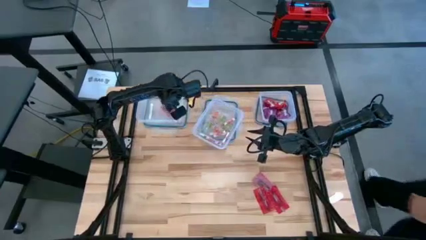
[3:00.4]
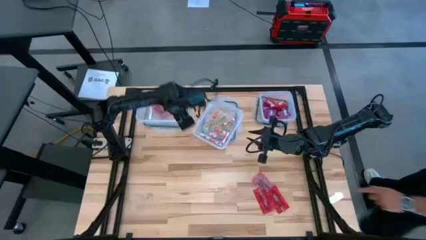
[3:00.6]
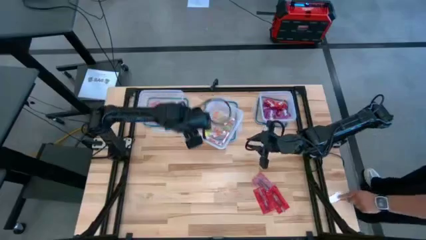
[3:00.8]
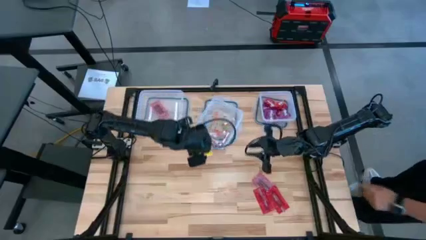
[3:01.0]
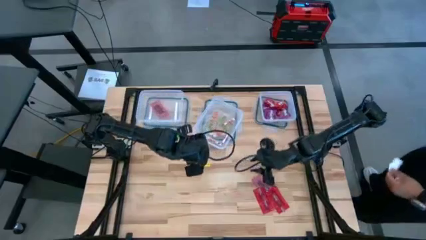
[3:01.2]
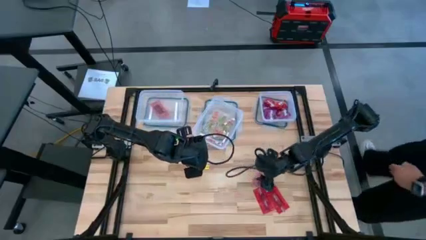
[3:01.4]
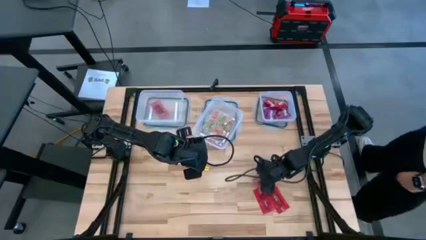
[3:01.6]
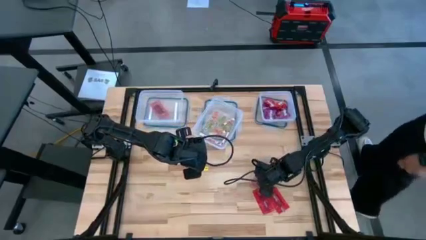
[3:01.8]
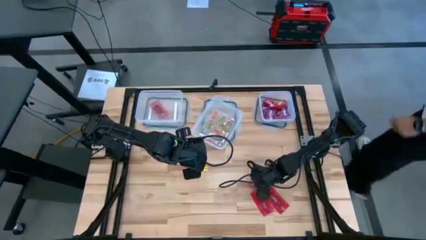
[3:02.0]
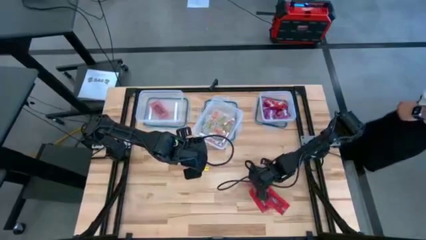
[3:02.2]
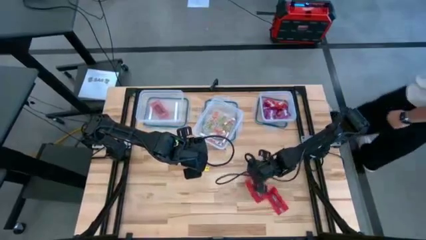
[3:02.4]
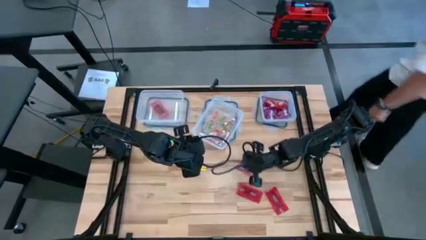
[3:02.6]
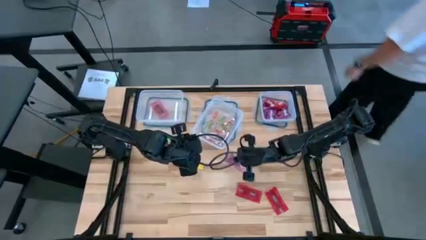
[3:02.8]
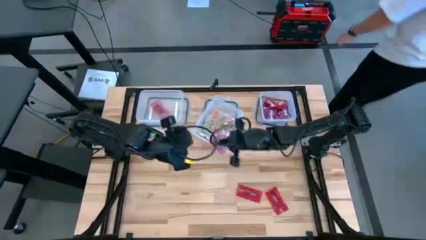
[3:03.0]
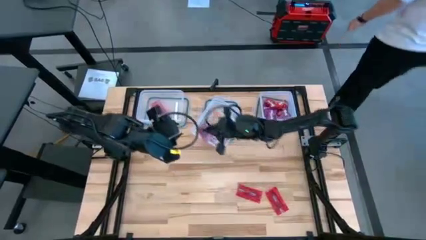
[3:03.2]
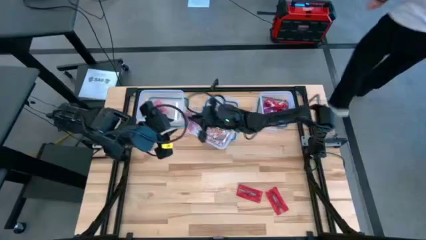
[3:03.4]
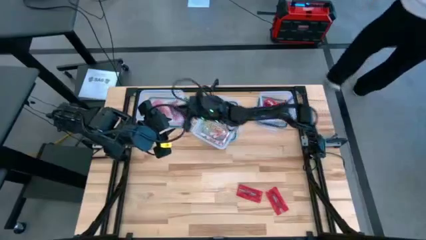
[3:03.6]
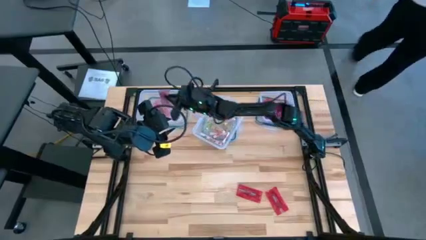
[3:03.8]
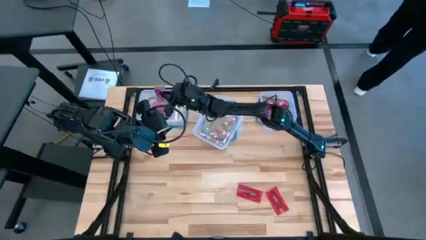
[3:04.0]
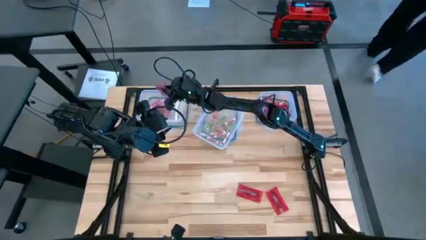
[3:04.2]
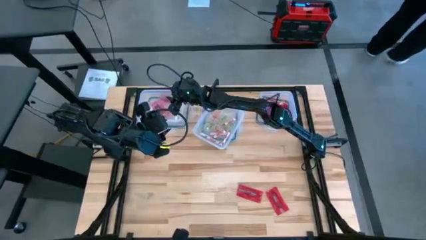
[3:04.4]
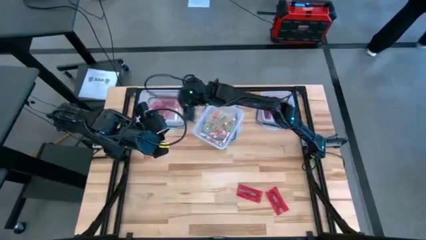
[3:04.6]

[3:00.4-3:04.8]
Task: Sort candy
Put the top center red candy into the left transparent bin

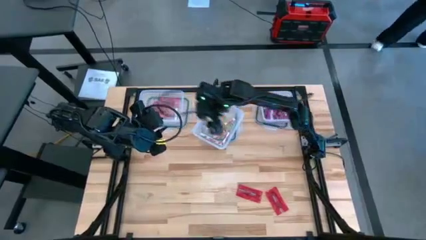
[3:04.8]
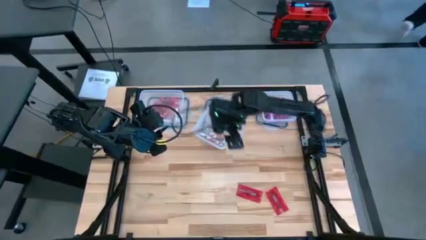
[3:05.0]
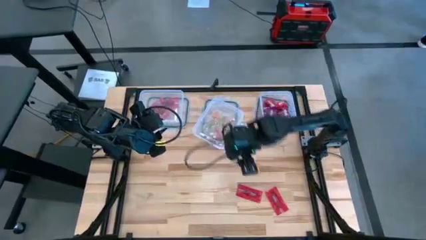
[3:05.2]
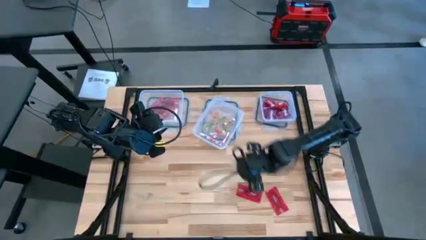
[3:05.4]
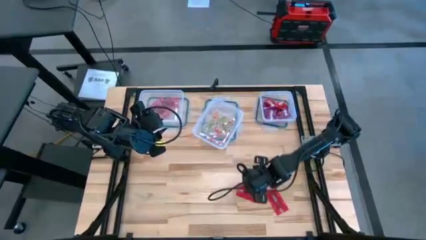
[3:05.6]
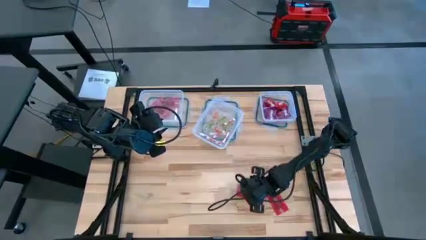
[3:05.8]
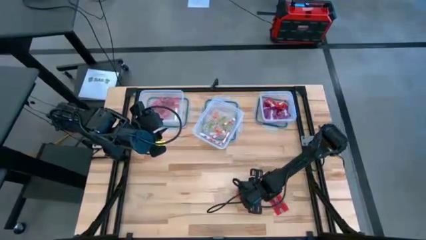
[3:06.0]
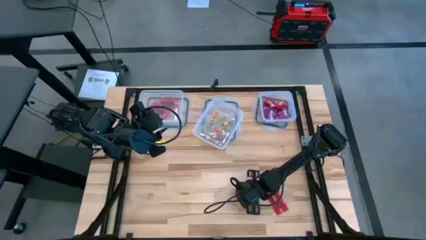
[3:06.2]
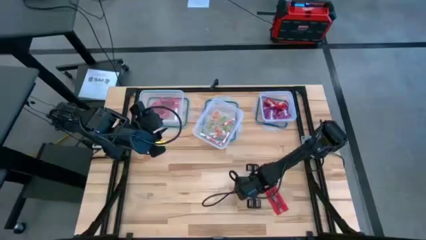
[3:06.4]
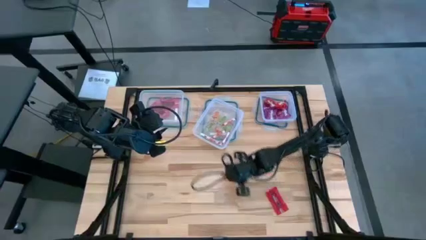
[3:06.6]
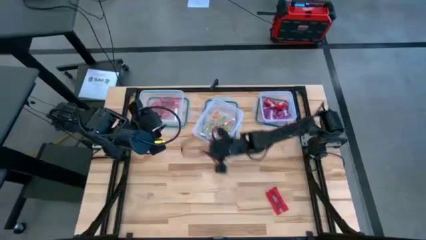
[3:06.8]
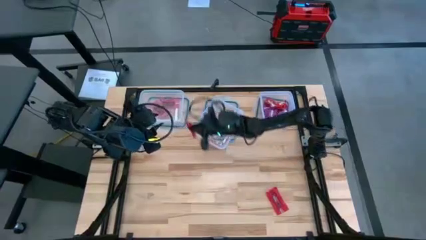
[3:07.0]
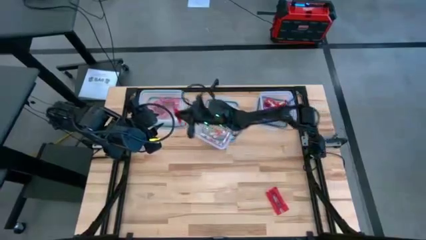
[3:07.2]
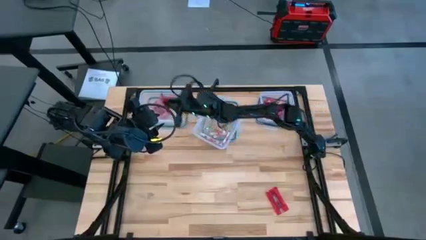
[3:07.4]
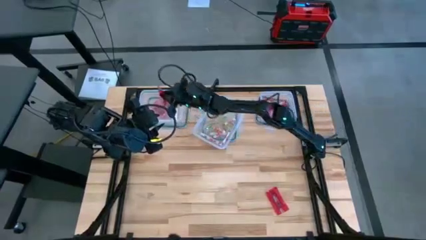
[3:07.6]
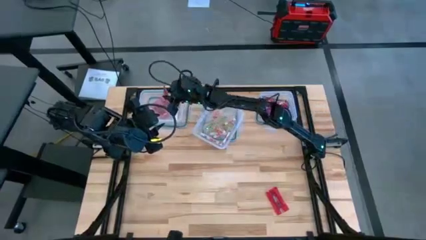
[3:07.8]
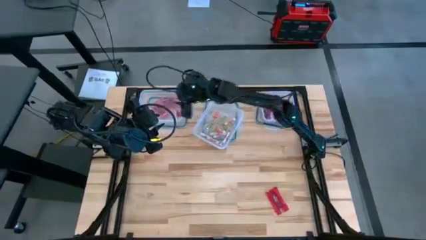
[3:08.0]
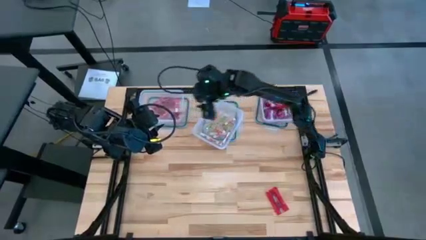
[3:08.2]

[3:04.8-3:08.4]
Put the left red candy into the transparent bin

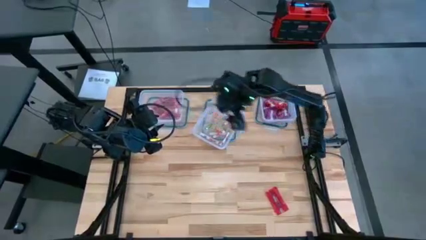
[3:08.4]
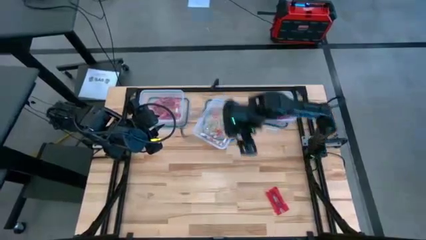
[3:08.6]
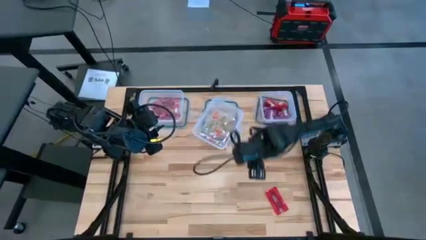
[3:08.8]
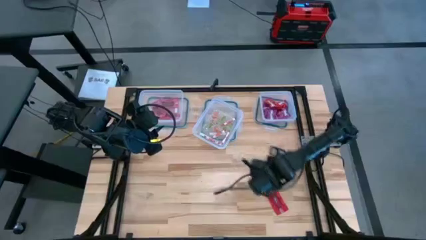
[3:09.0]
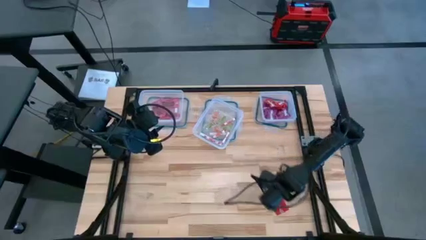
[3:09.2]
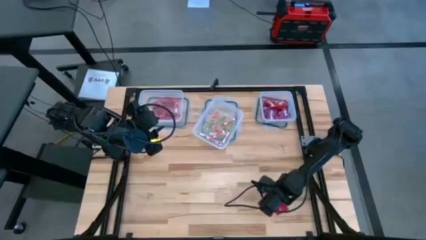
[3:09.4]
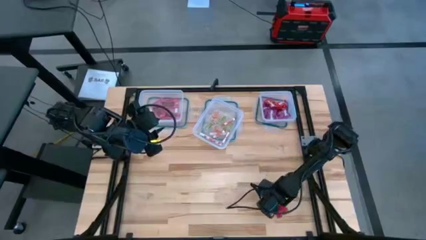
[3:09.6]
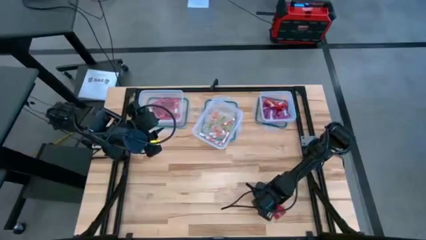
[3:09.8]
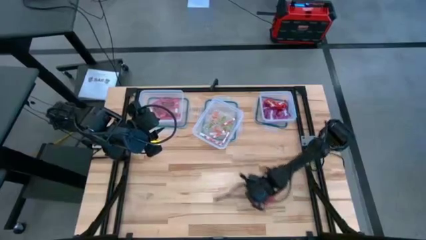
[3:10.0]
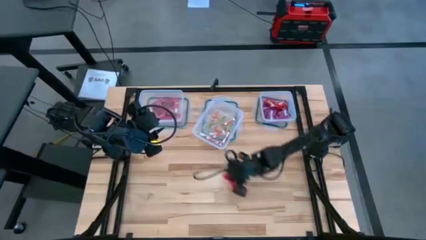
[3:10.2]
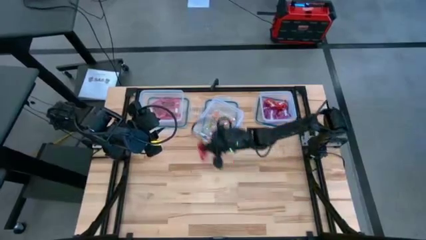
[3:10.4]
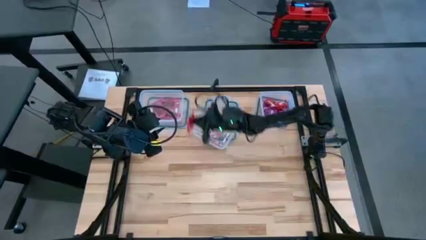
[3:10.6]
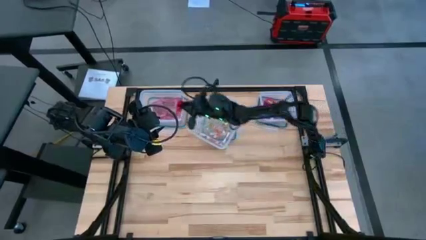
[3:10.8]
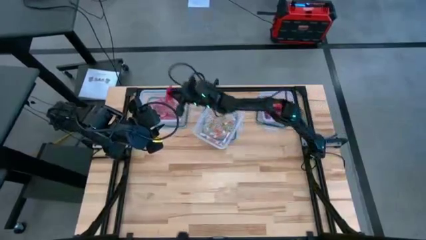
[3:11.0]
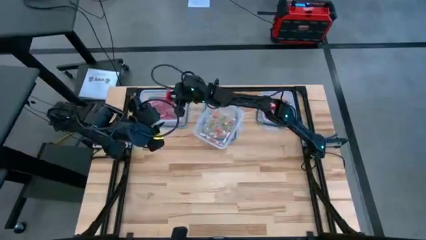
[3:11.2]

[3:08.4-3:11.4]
Put the red candy into the transparent bin

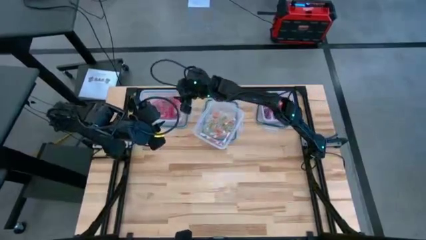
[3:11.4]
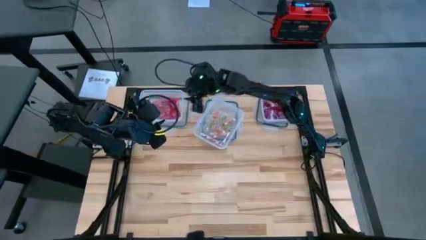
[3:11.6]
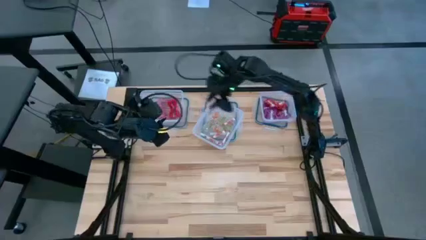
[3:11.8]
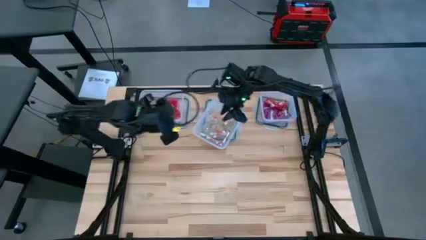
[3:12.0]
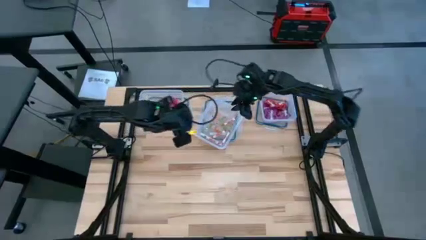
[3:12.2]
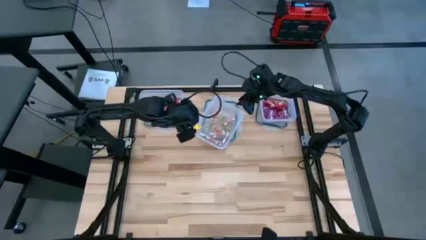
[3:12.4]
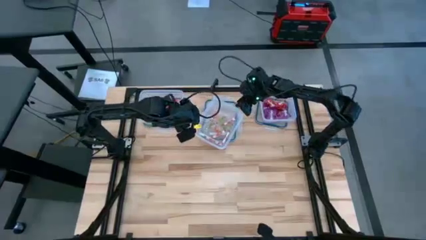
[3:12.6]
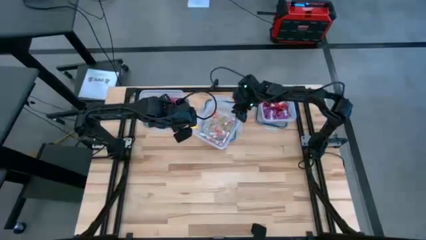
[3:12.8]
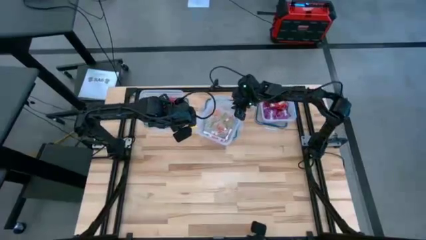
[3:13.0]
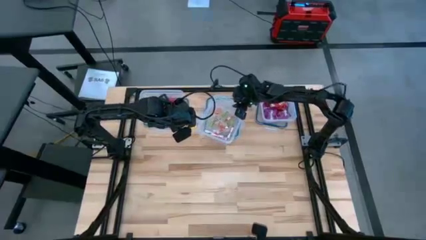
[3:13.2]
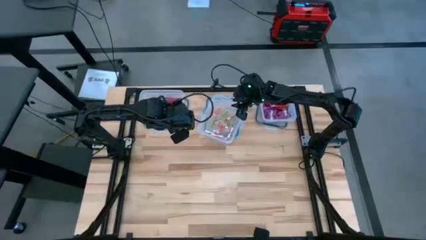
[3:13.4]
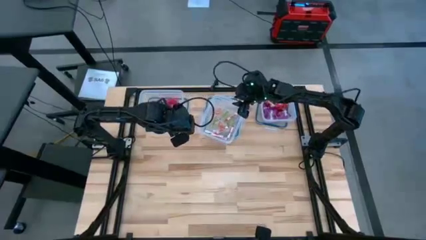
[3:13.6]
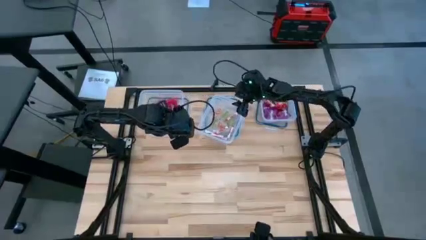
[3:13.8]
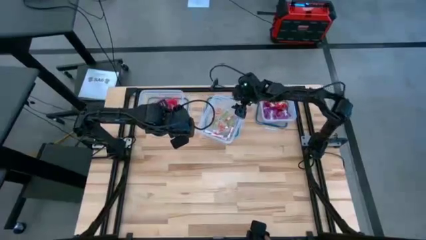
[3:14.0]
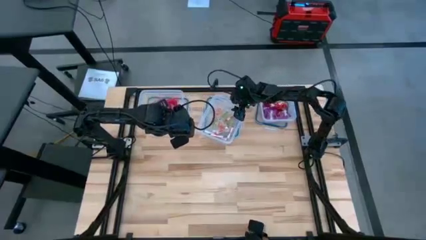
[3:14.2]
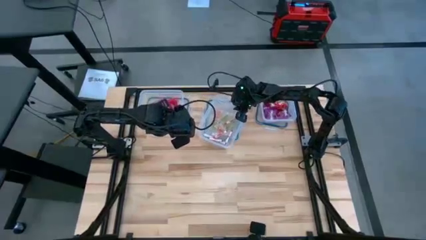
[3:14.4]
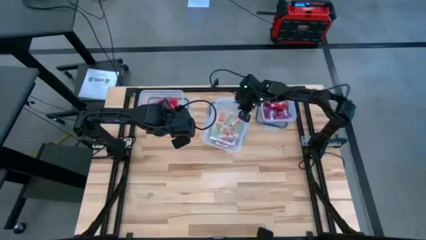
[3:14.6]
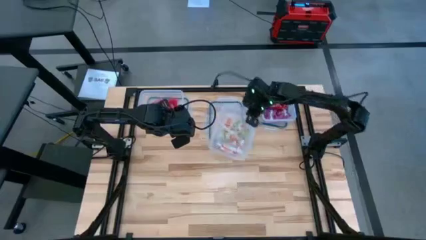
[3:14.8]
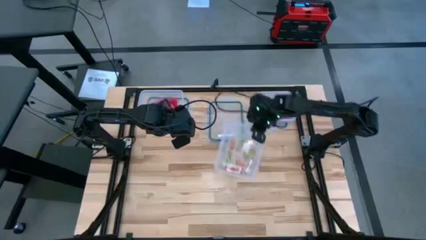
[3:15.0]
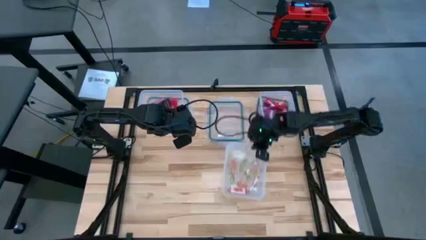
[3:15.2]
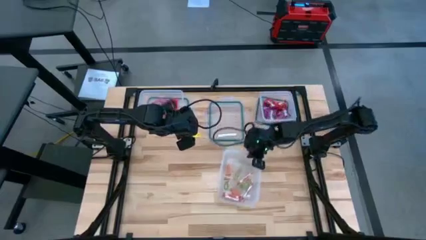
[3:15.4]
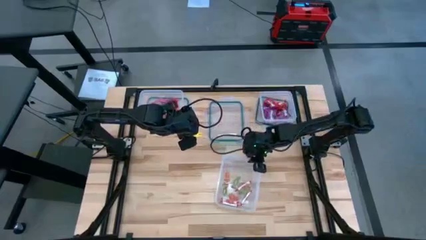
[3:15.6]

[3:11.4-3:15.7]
Move the top center transparent bin closer to the center
